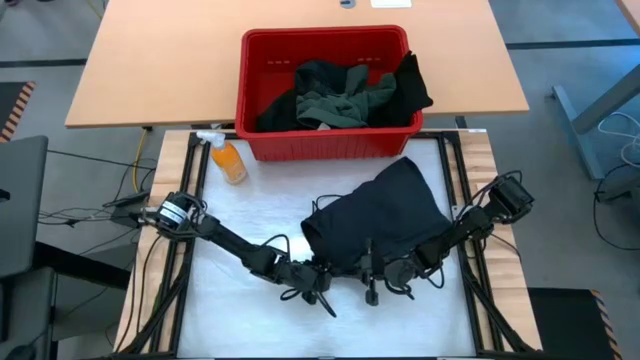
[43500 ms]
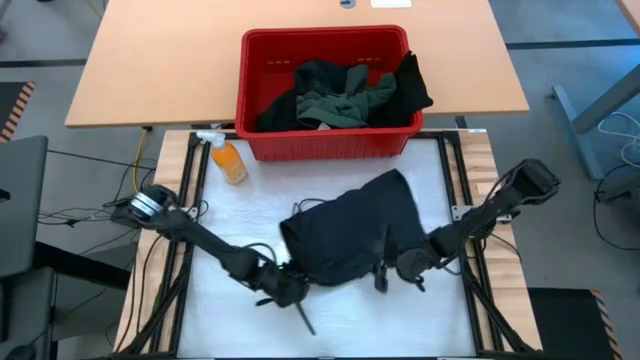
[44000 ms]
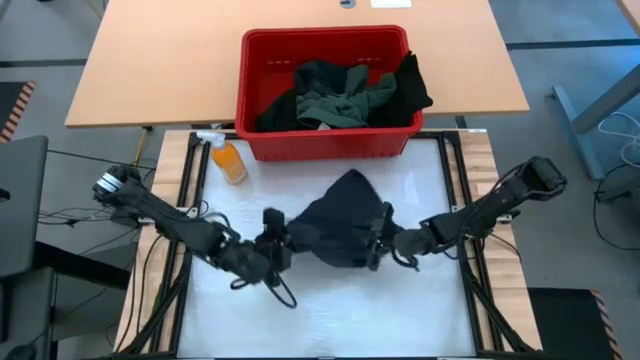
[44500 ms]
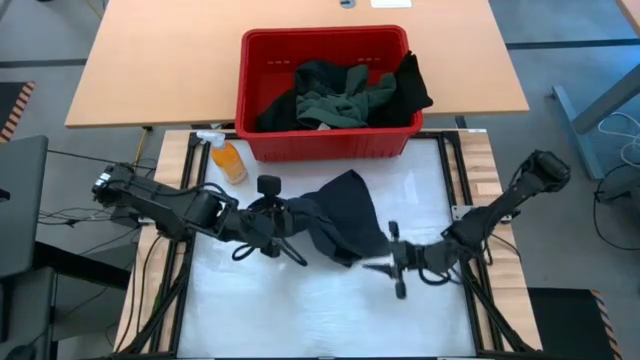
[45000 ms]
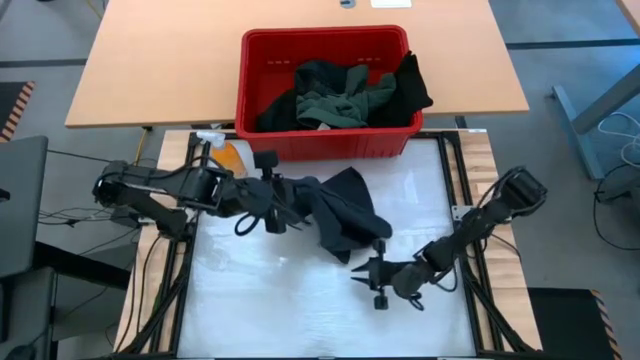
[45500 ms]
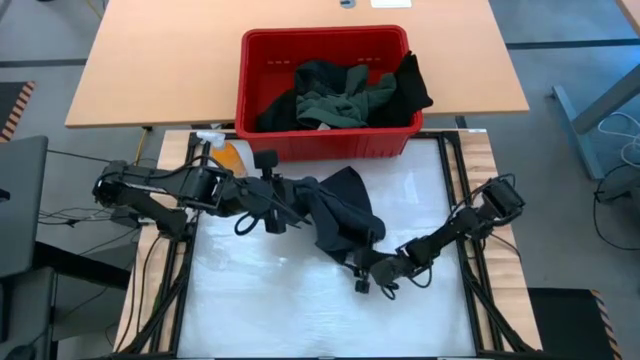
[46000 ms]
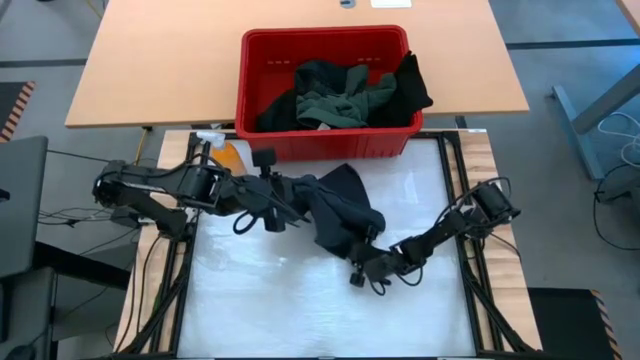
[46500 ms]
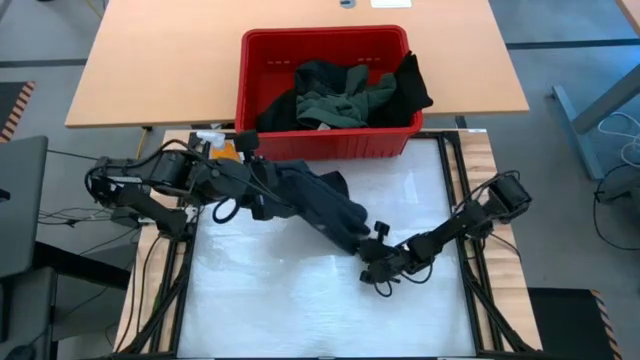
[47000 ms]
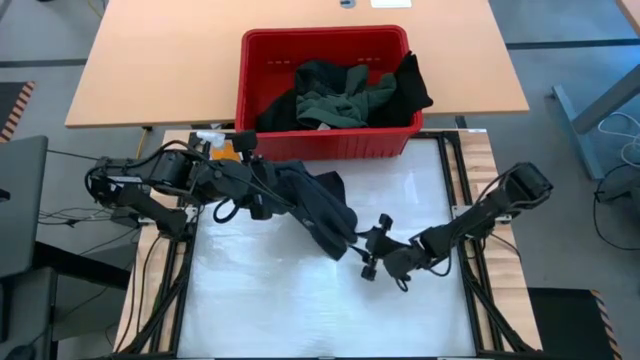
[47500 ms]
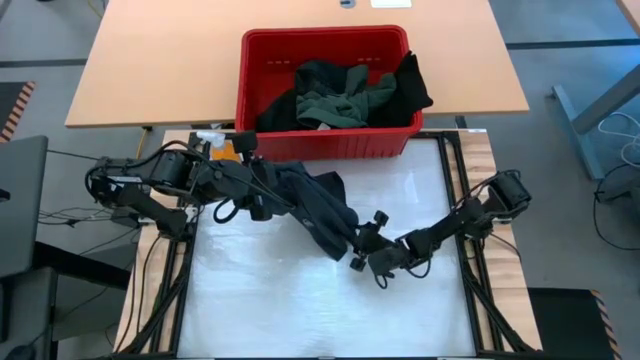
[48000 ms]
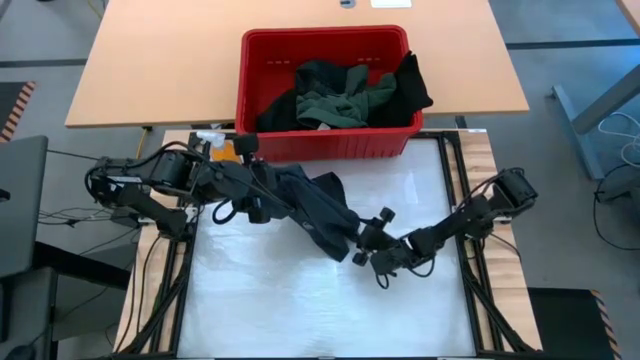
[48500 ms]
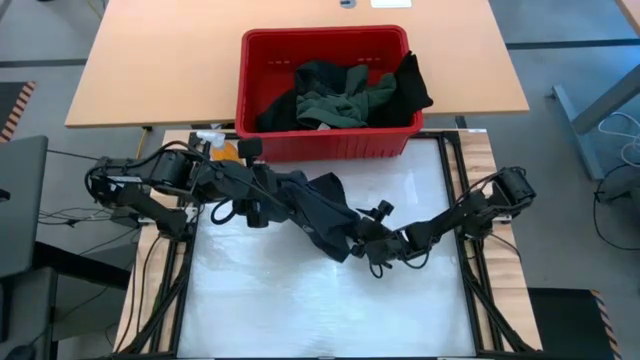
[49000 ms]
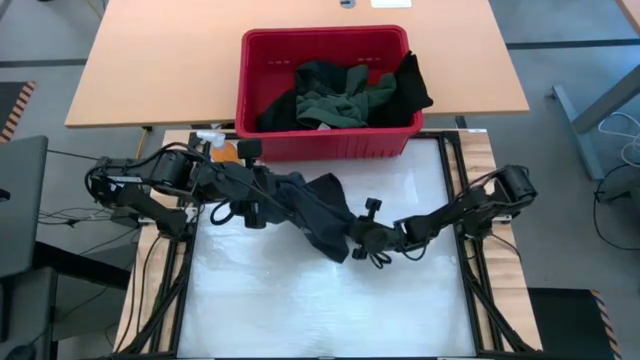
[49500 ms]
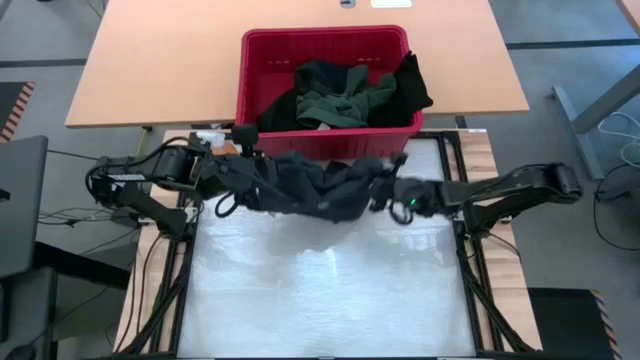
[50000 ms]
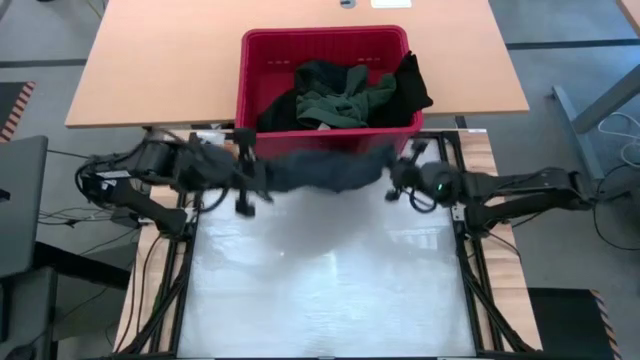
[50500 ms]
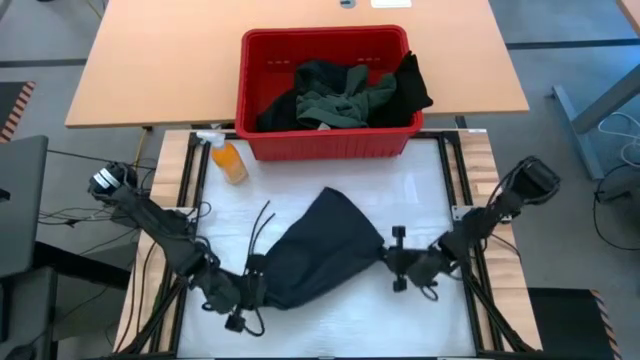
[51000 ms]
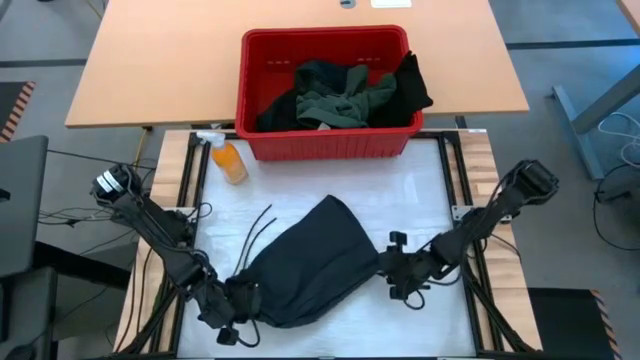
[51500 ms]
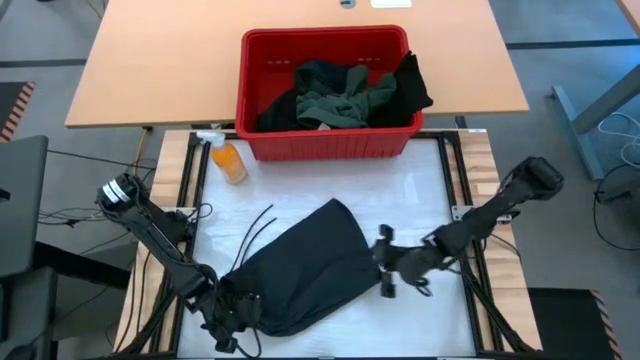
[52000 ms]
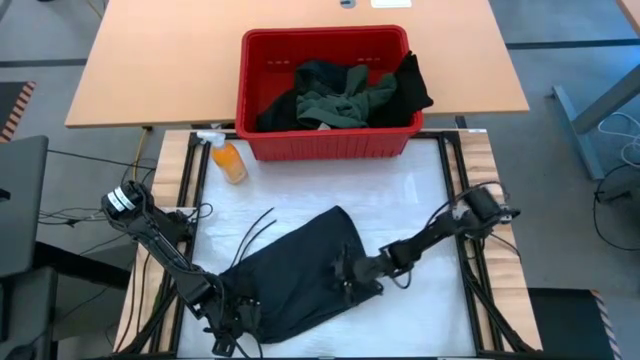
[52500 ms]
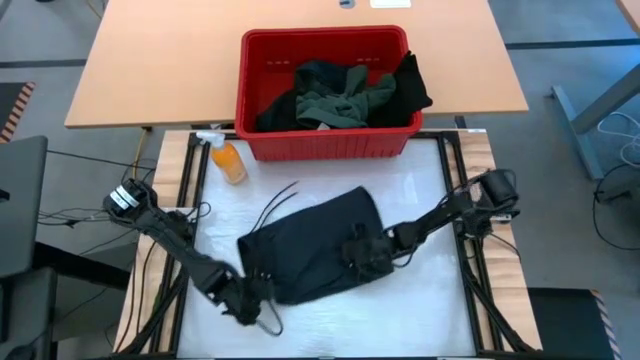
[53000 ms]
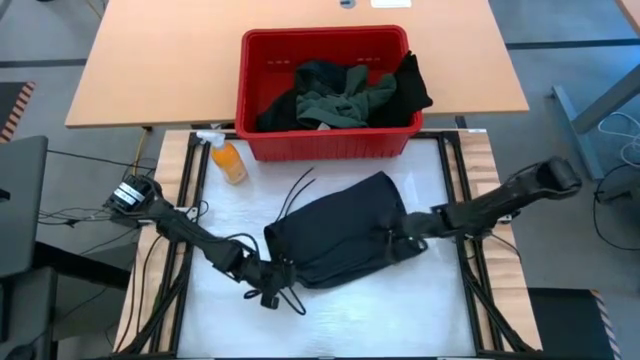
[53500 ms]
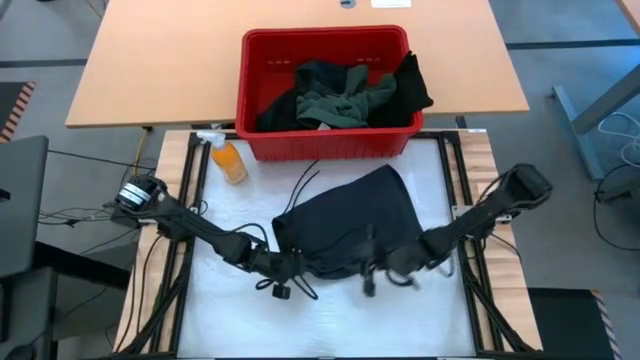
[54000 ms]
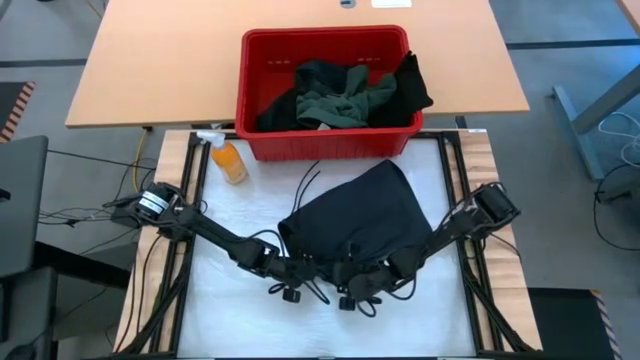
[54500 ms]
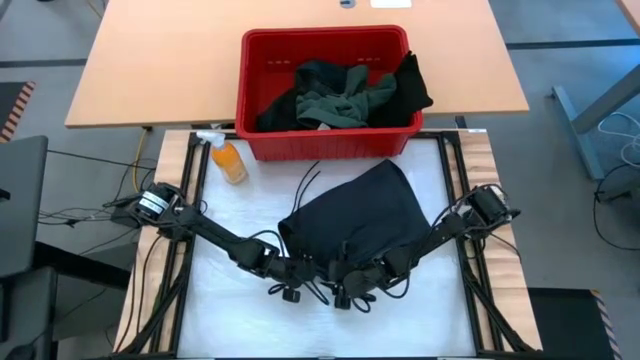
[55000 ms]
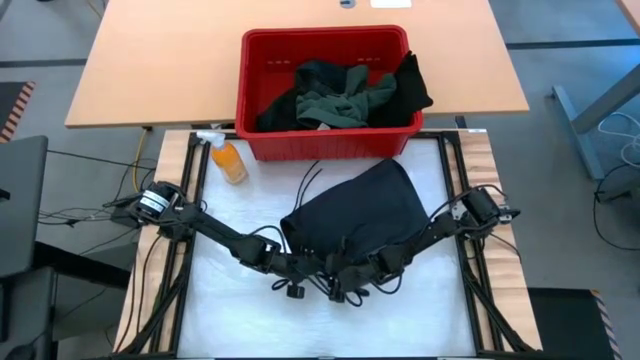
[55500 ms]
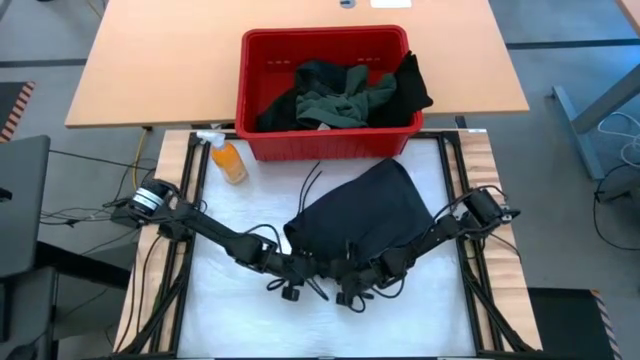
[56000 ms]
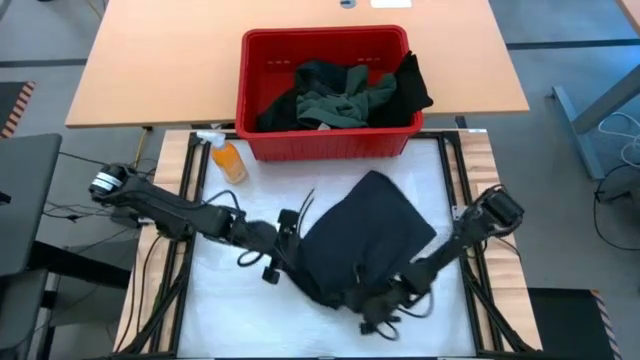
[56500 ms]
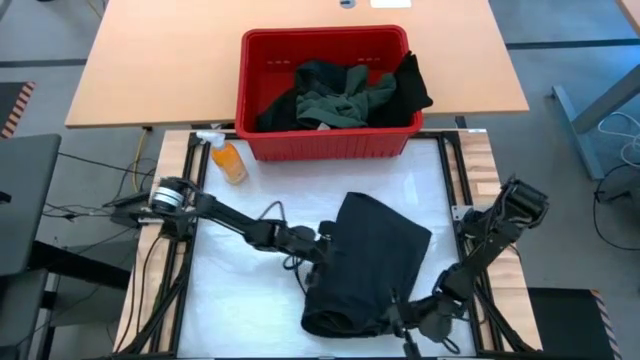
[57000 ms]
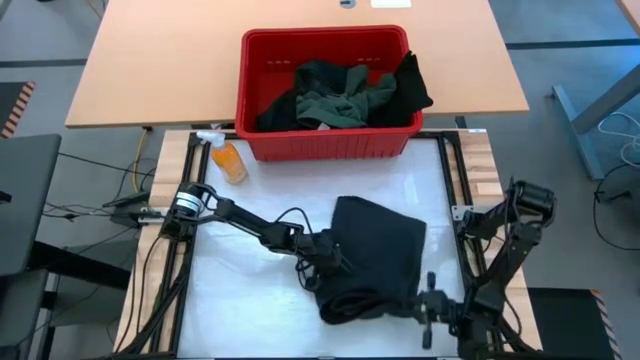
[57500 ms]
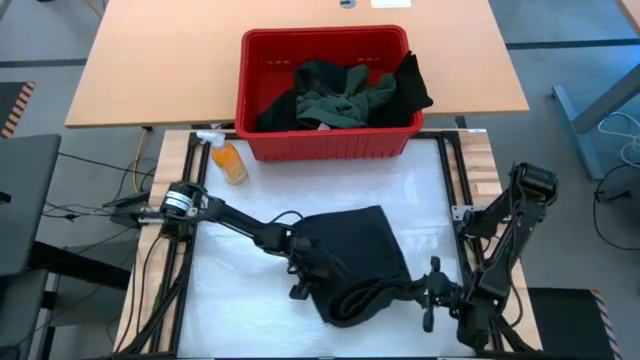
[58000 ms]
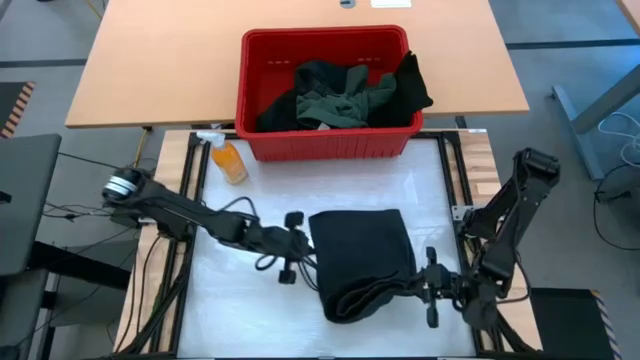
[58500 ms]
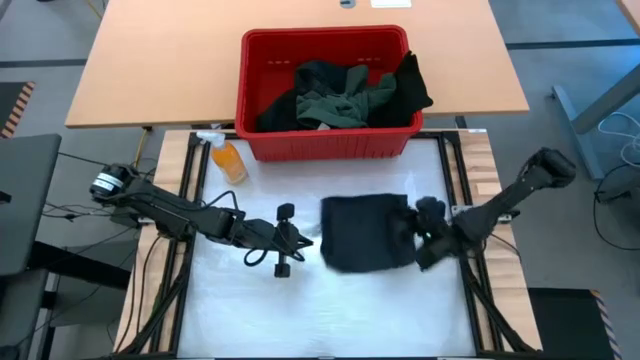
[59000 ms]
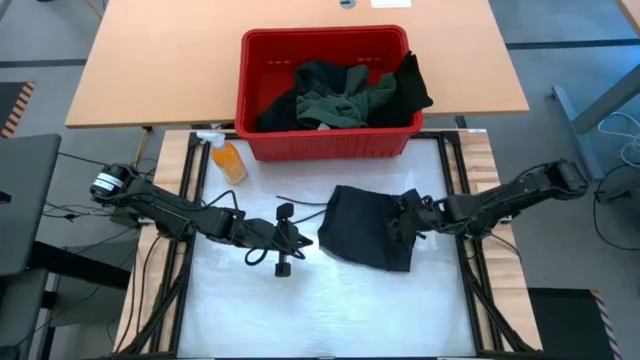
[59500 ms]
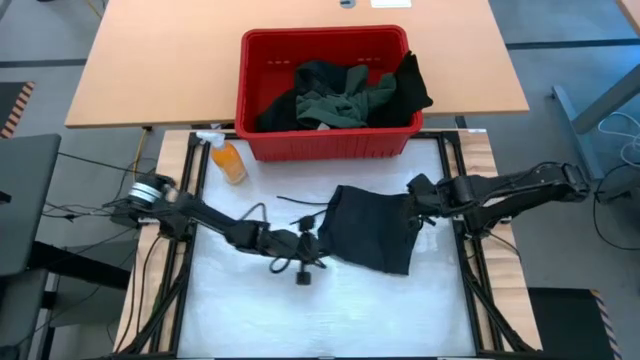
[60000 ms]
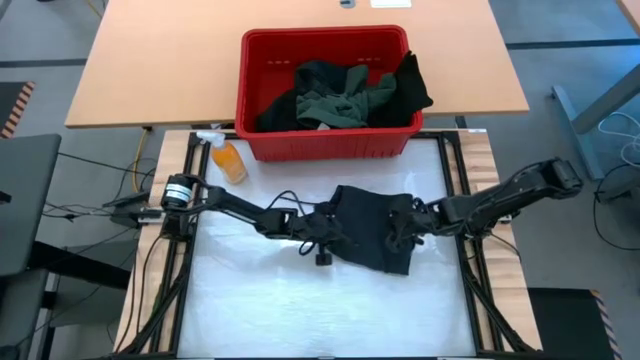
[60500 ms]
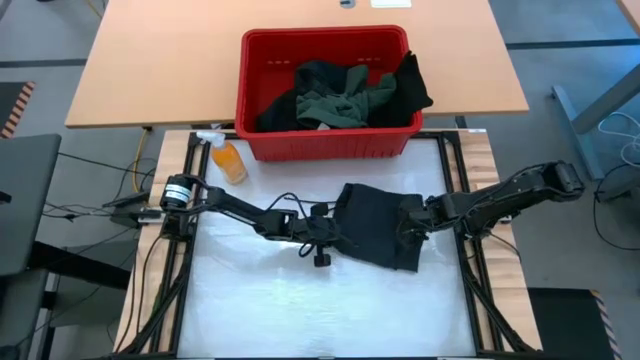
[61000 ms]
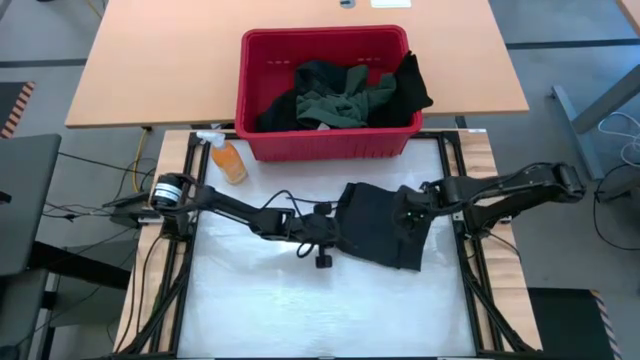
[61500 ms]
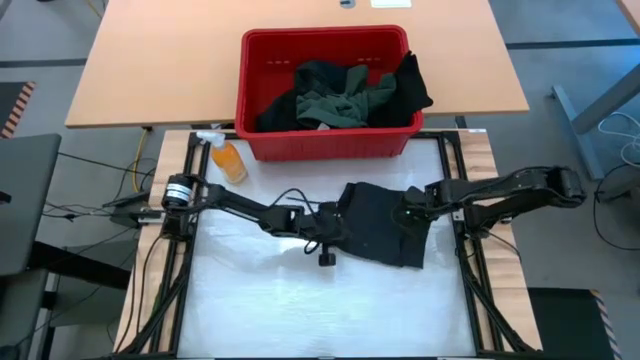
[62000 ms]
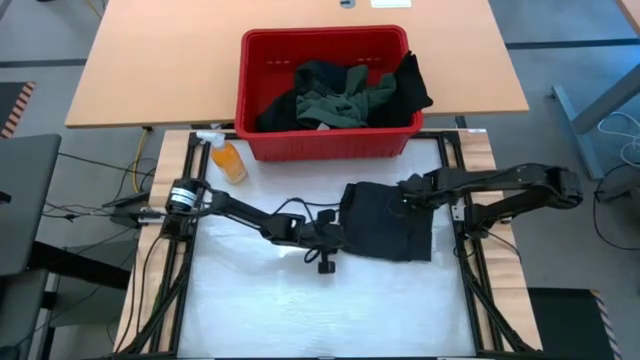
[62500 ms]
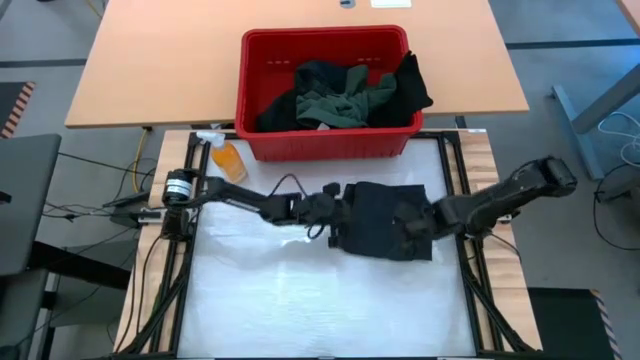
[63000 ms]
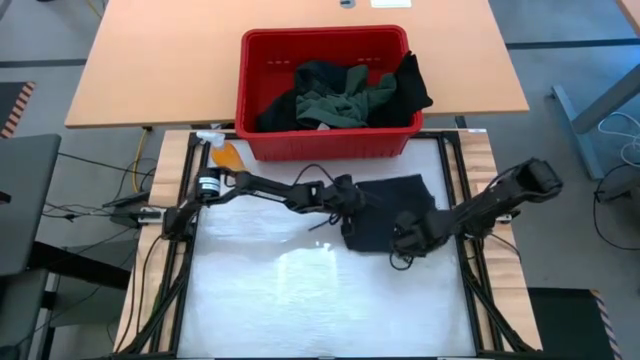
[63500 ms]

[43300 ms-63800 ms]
Task: Fold laundry
Fold the black shorts
